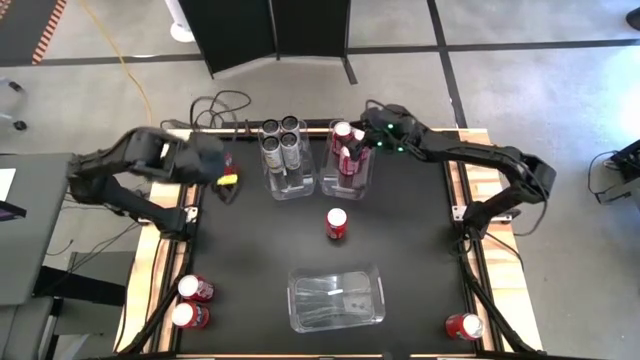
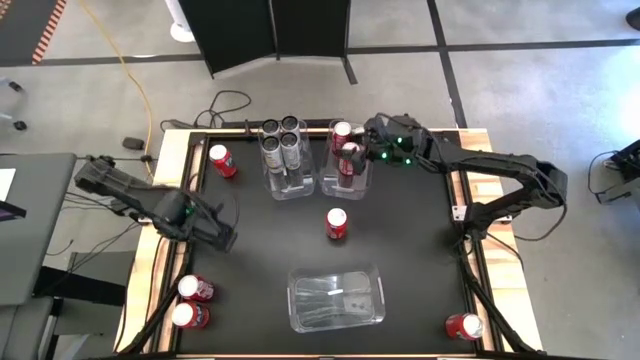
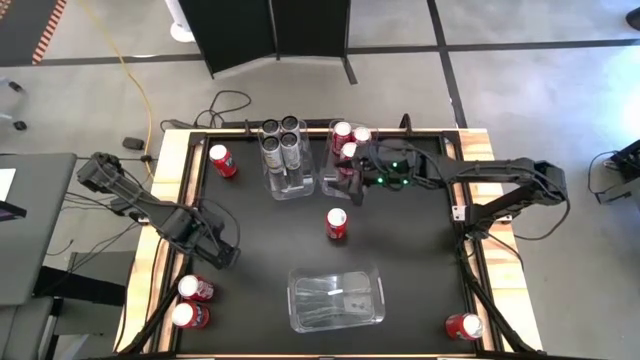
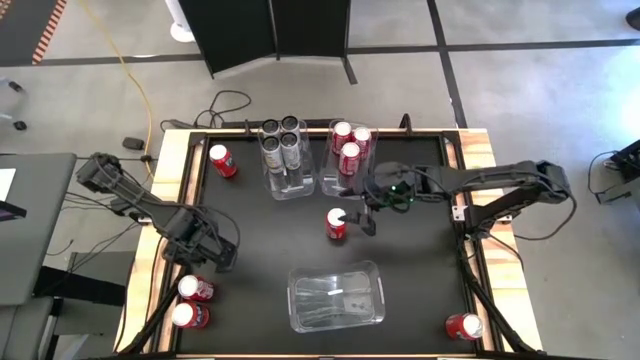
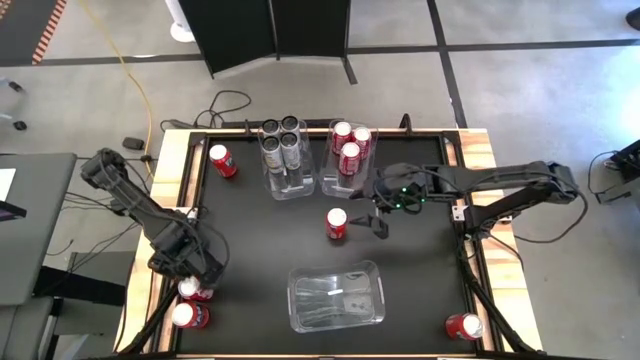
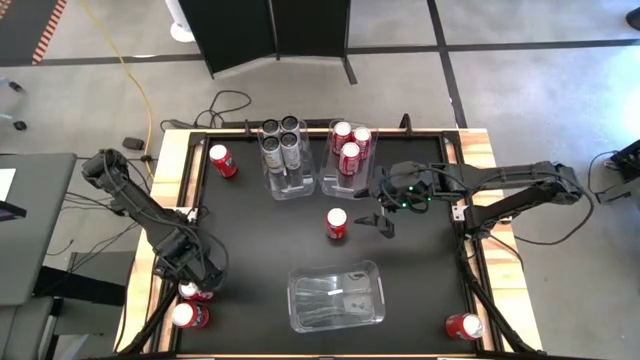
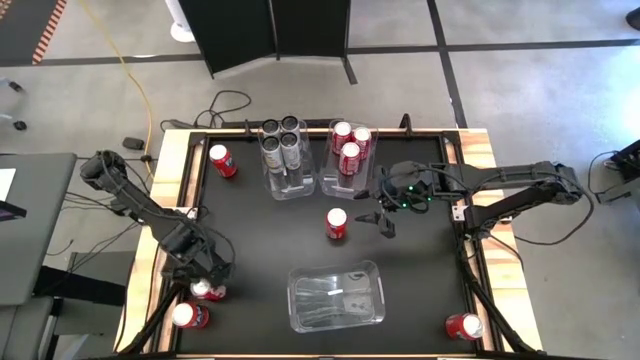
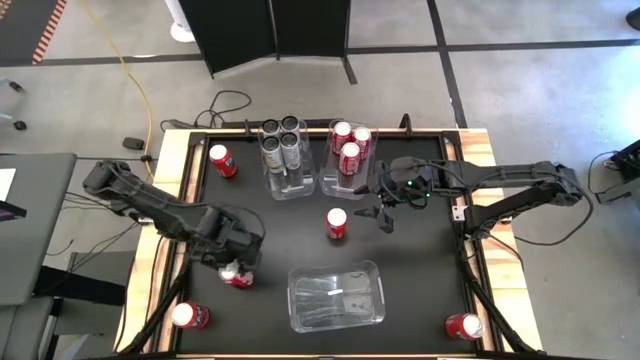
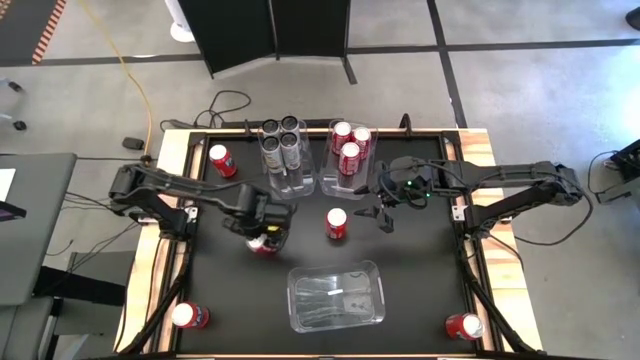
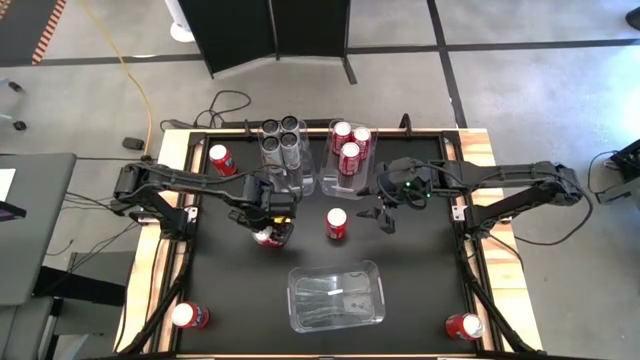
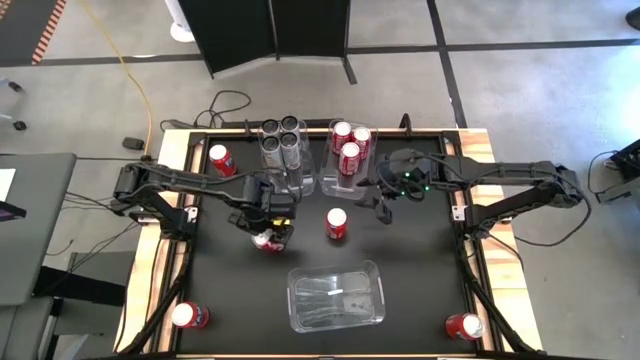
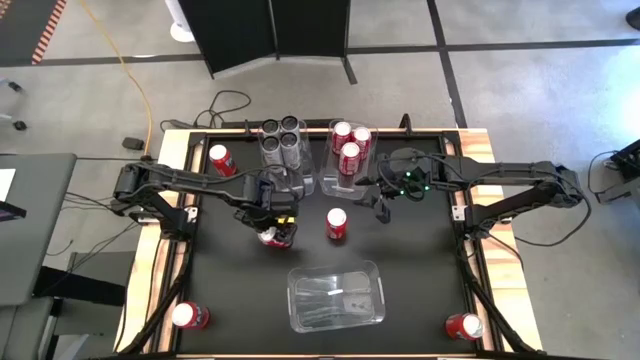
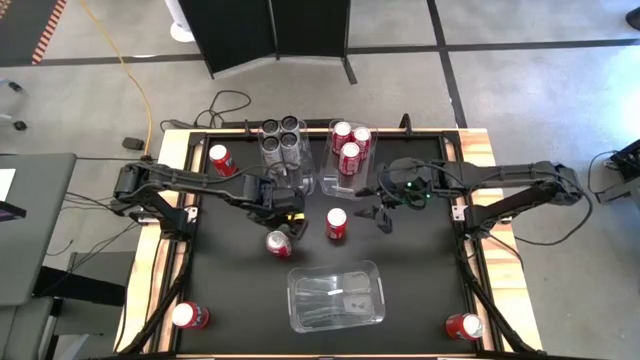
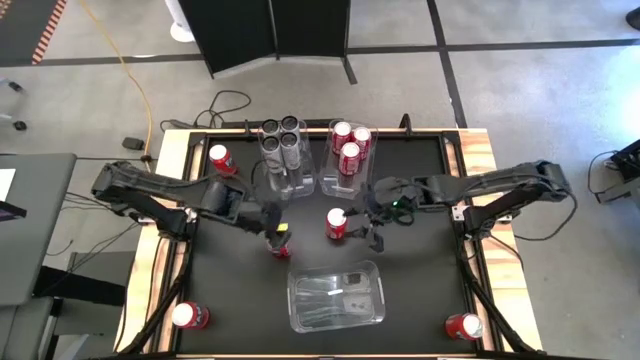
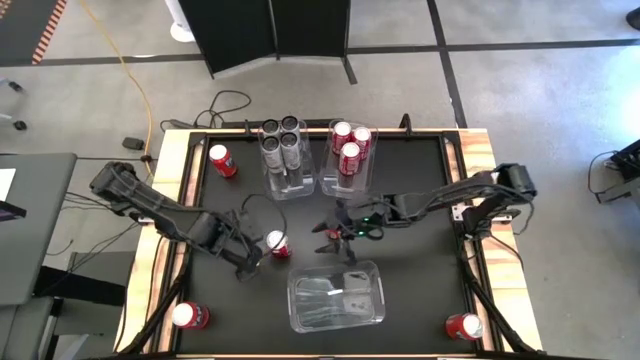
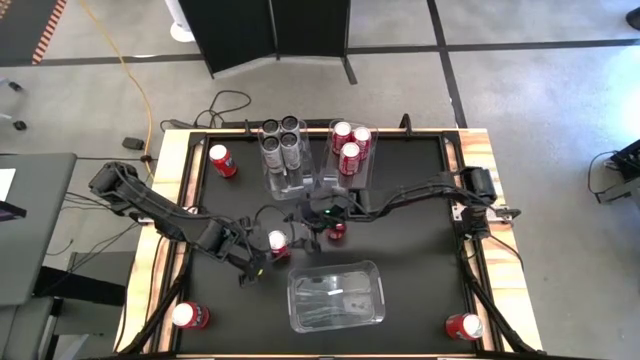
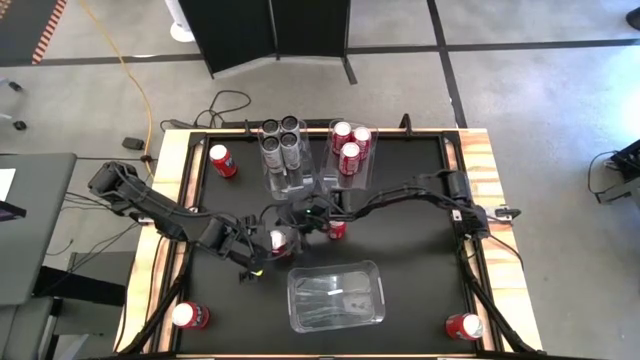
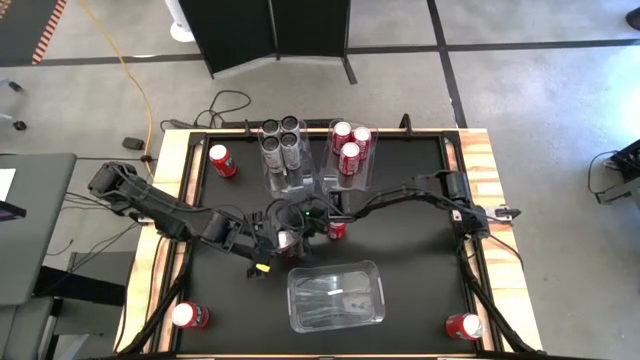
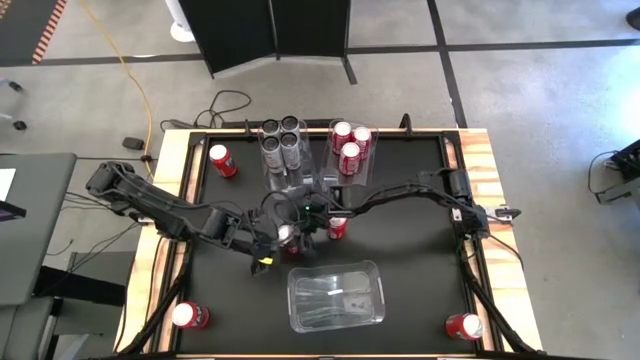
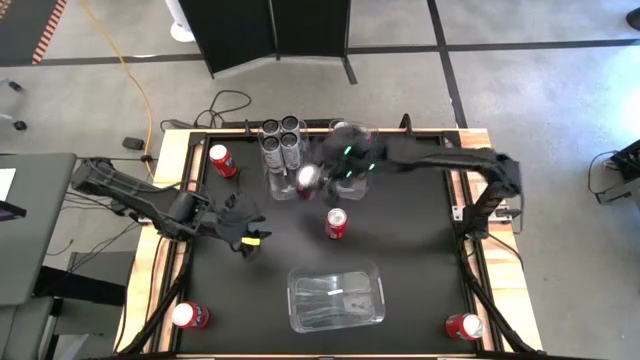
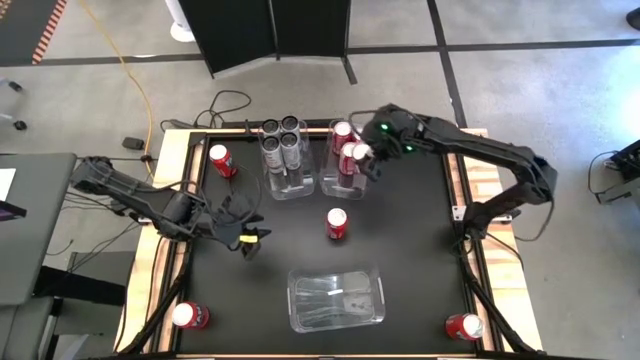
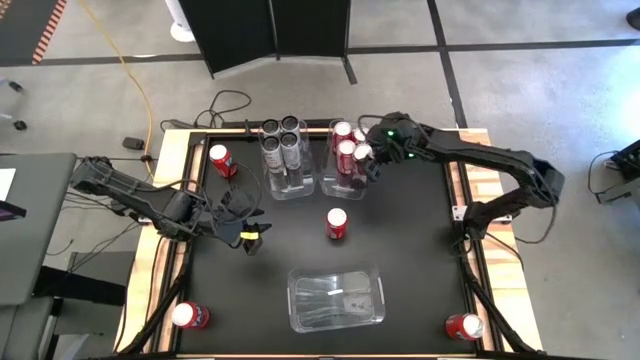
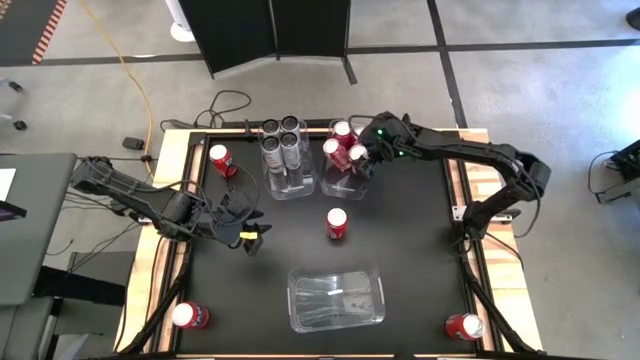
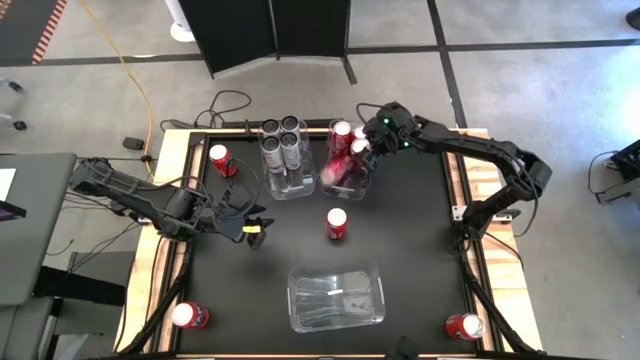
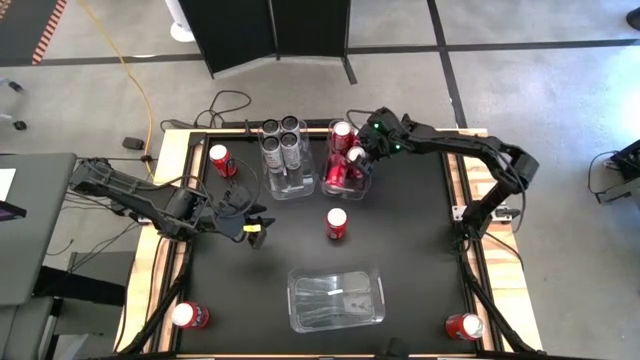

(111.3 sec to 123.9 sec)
Task: Sort soda cans
Put the red soda can into the top right transparent bin

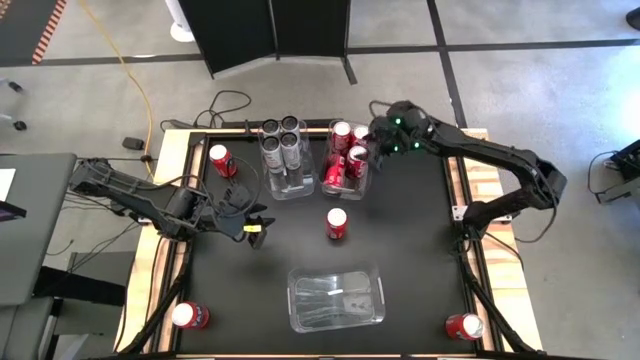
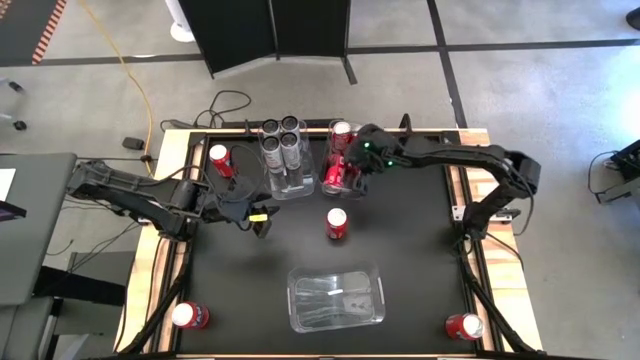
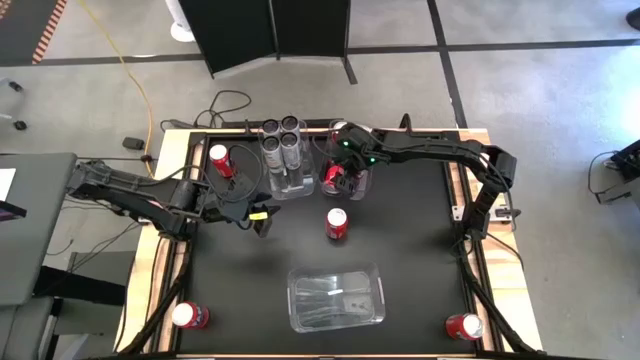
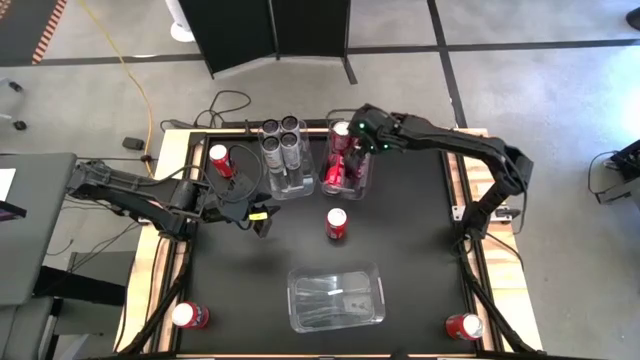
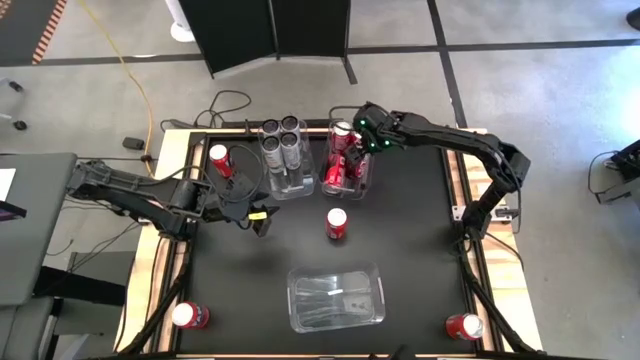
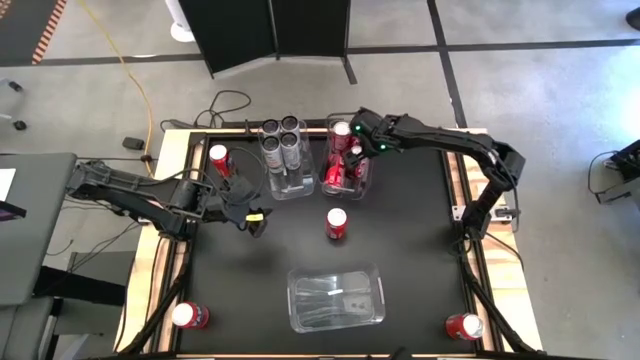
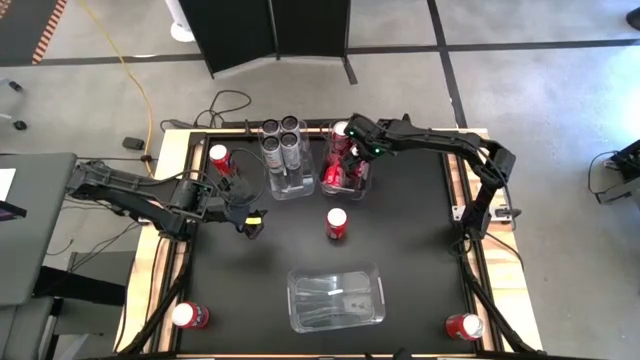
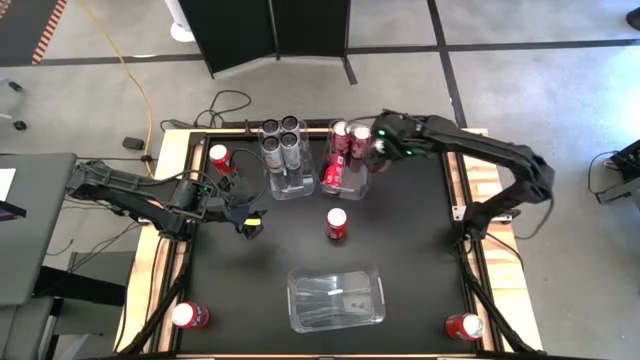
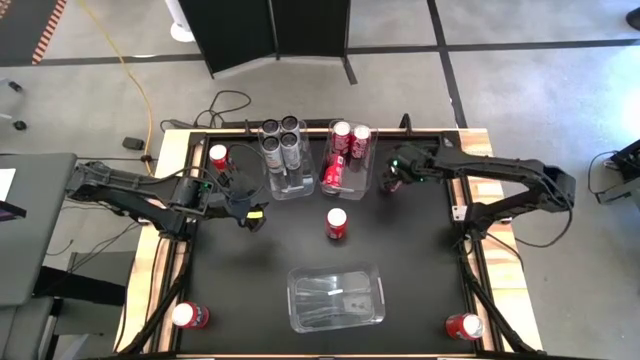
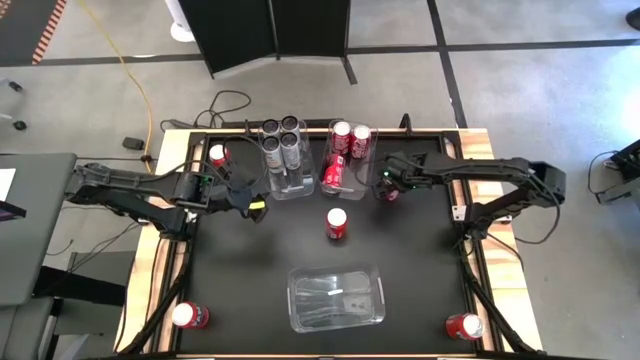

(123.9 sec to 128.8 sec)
Remove the bottom right red soda can from the top right transparent bin

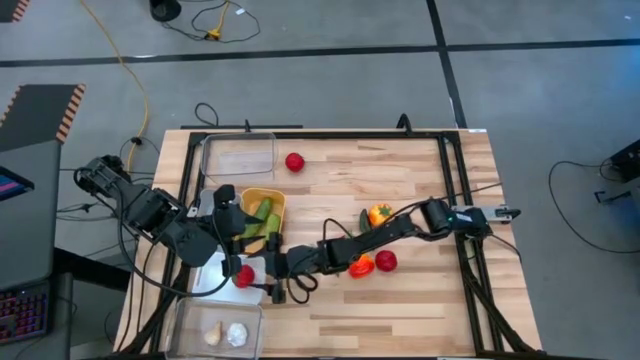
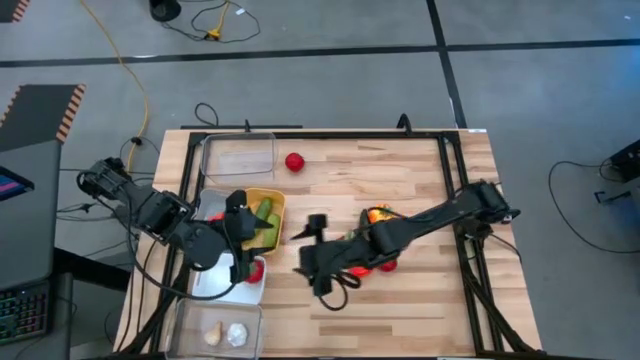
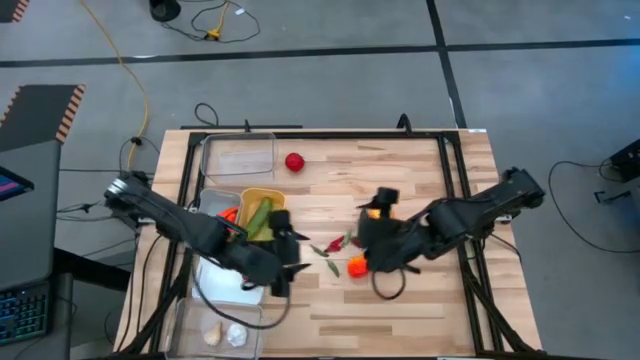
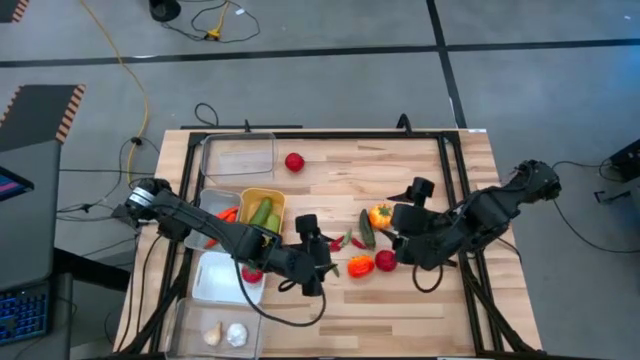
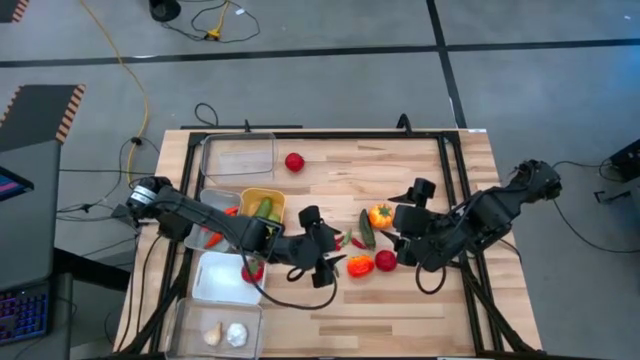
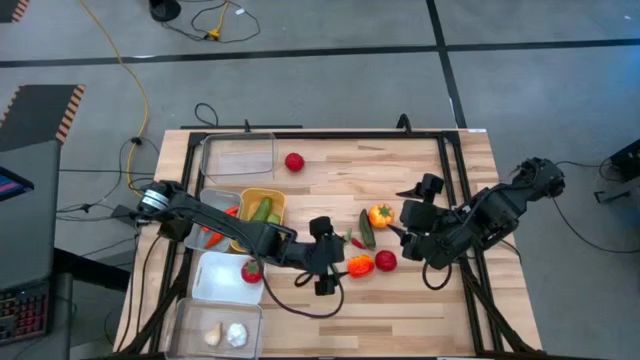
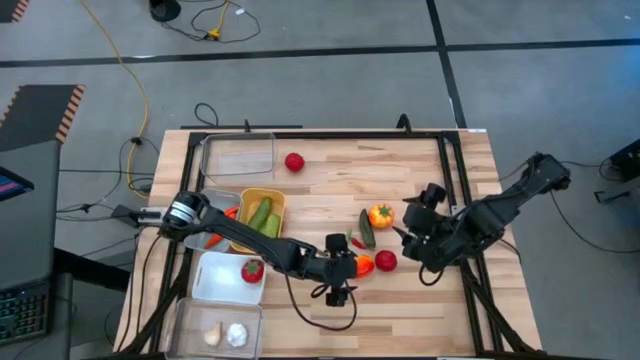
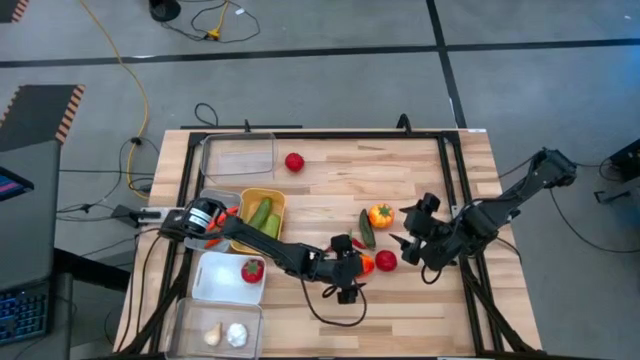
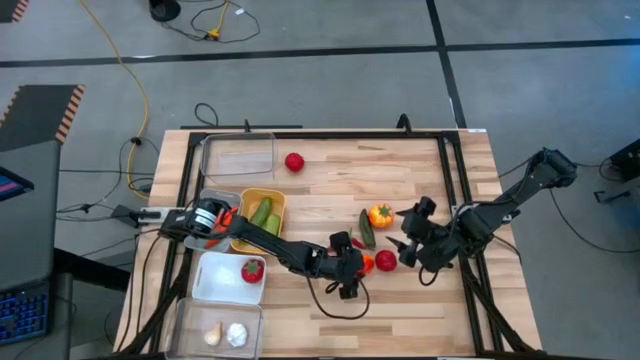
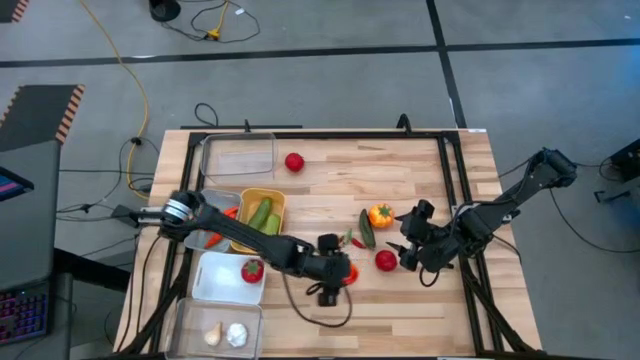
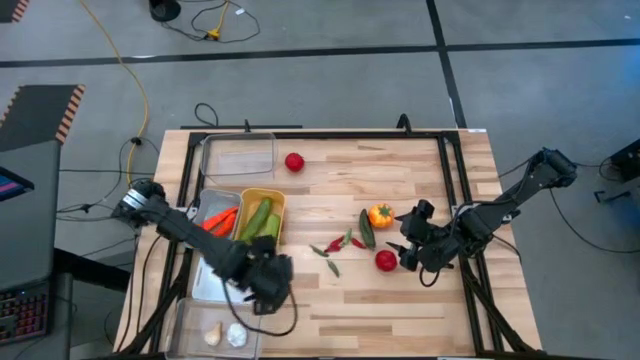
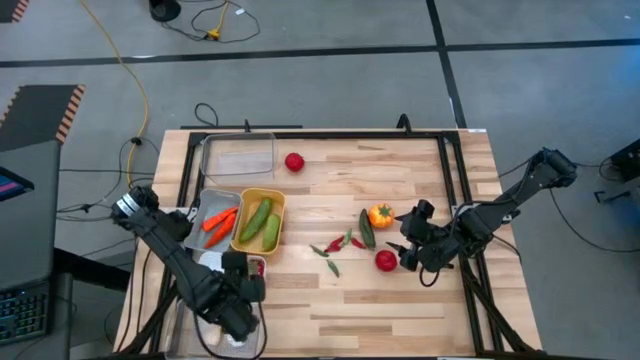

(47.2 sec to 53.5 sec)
Task: Sort produce into baskets
Put the center tomato into the white bin
